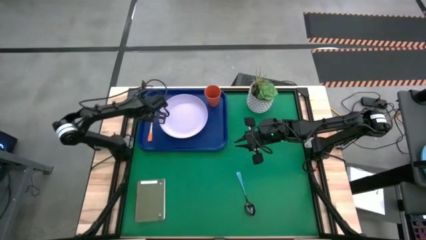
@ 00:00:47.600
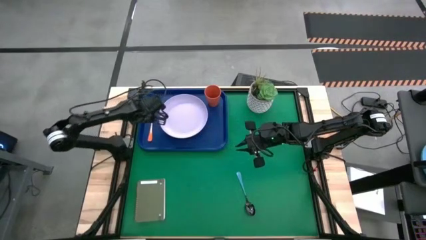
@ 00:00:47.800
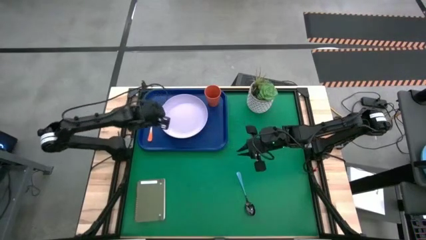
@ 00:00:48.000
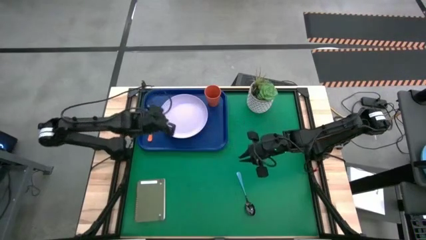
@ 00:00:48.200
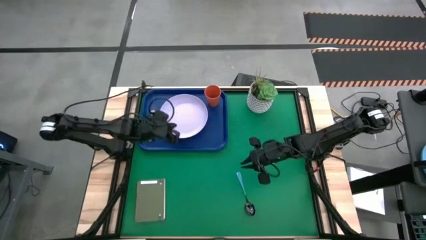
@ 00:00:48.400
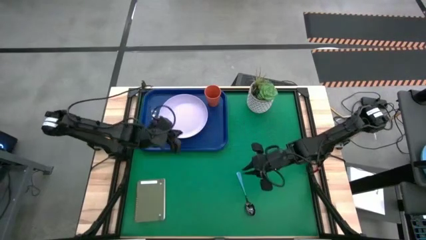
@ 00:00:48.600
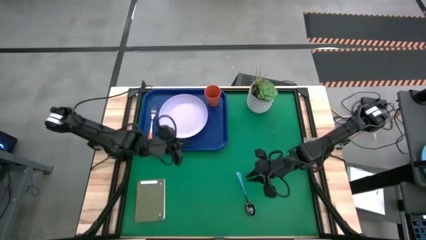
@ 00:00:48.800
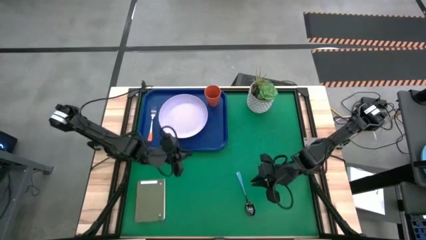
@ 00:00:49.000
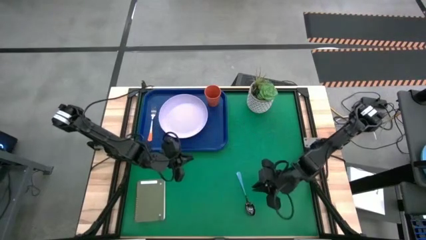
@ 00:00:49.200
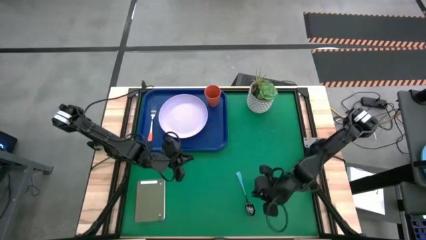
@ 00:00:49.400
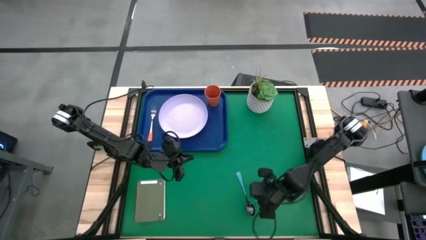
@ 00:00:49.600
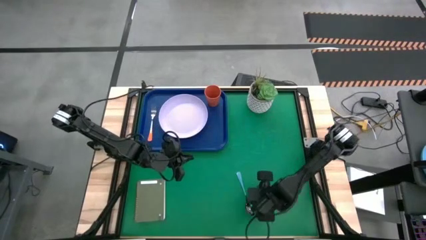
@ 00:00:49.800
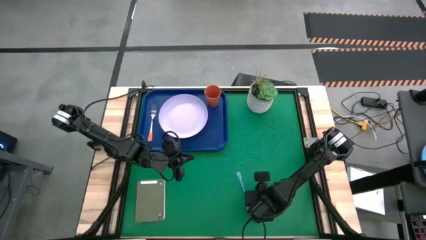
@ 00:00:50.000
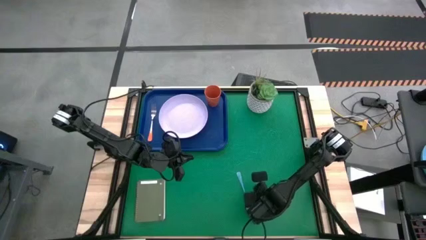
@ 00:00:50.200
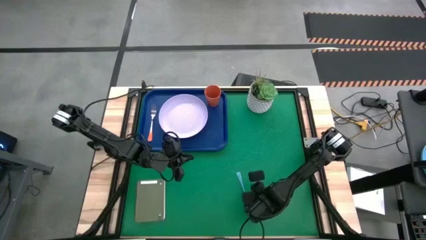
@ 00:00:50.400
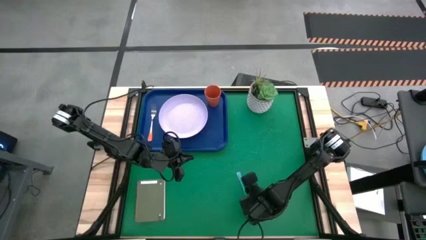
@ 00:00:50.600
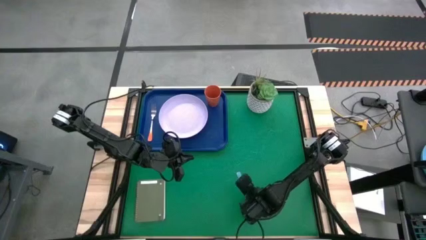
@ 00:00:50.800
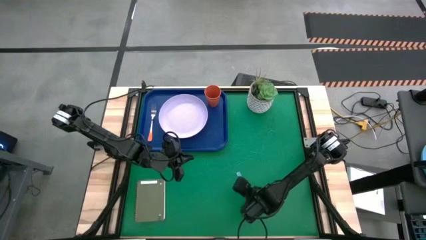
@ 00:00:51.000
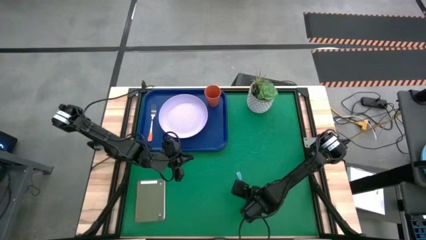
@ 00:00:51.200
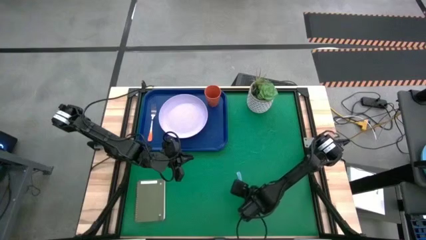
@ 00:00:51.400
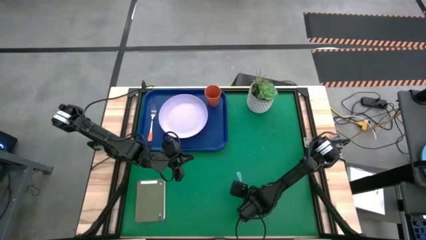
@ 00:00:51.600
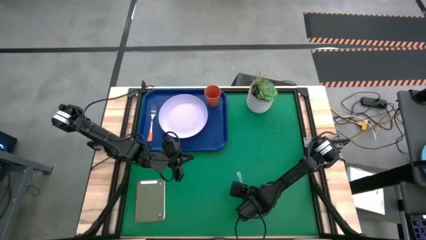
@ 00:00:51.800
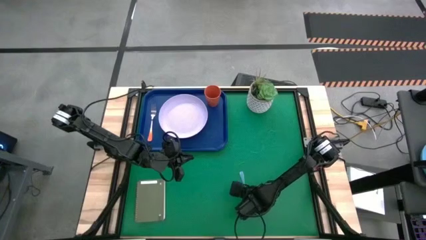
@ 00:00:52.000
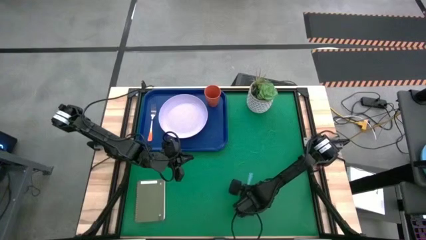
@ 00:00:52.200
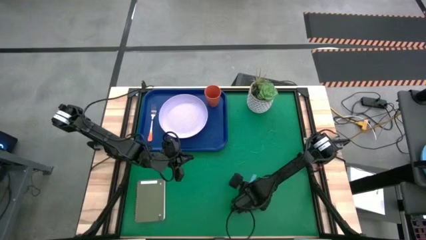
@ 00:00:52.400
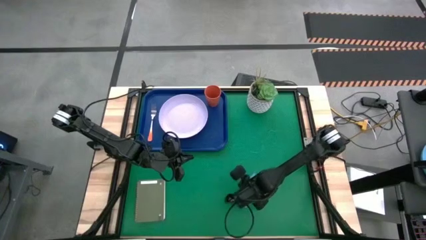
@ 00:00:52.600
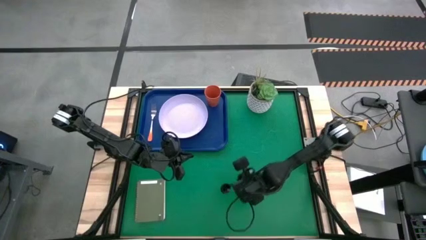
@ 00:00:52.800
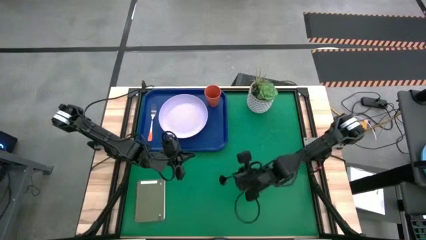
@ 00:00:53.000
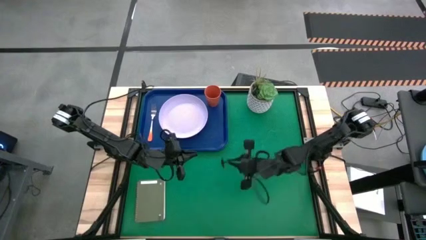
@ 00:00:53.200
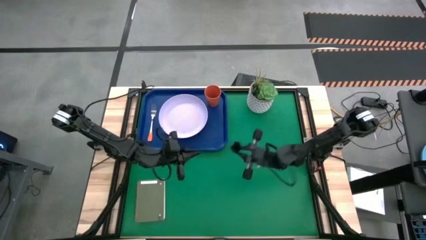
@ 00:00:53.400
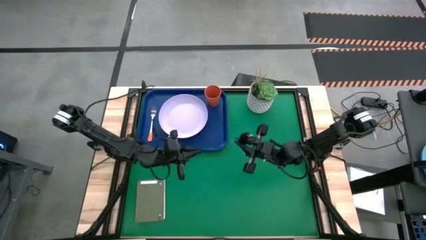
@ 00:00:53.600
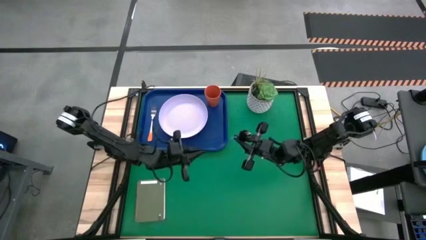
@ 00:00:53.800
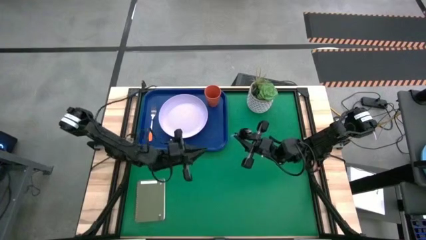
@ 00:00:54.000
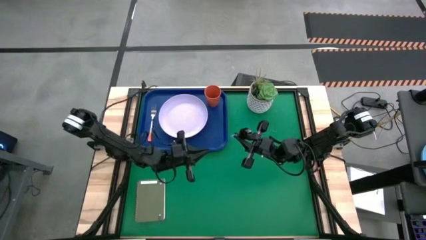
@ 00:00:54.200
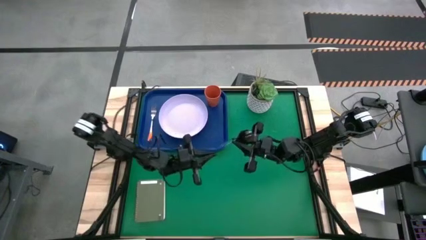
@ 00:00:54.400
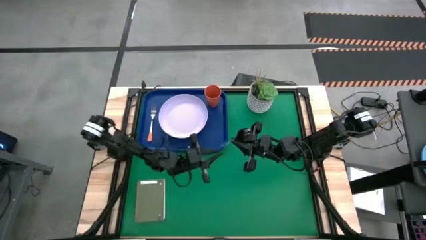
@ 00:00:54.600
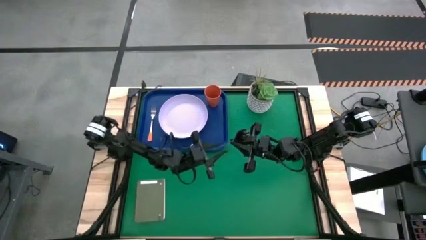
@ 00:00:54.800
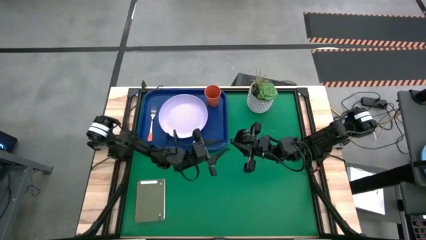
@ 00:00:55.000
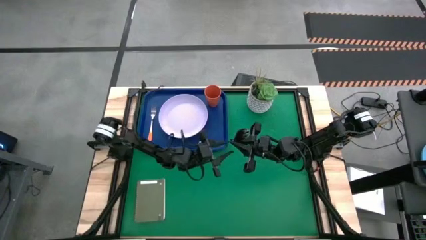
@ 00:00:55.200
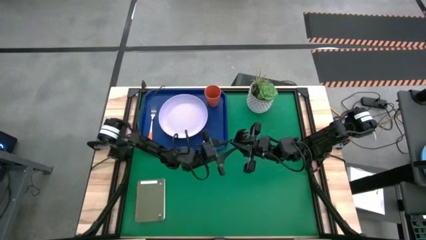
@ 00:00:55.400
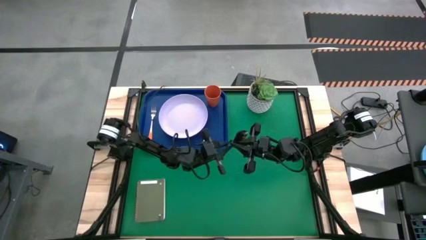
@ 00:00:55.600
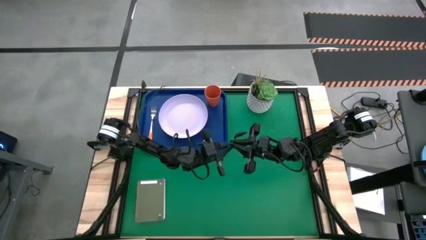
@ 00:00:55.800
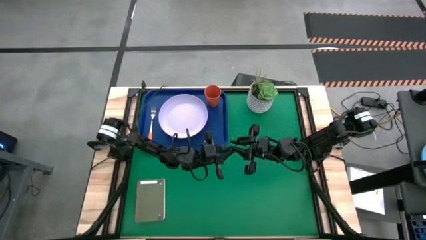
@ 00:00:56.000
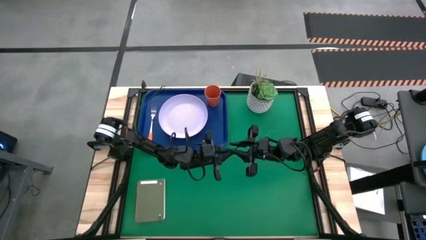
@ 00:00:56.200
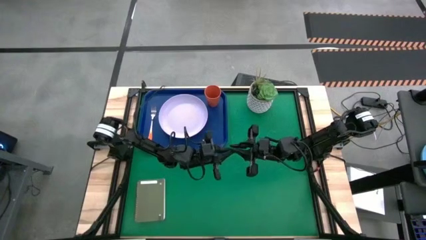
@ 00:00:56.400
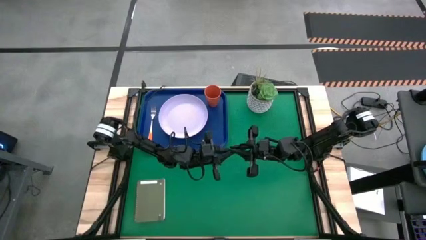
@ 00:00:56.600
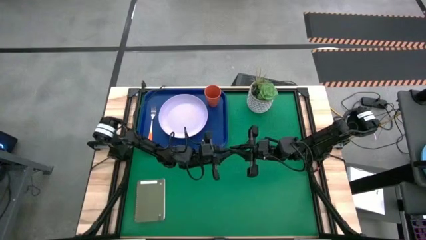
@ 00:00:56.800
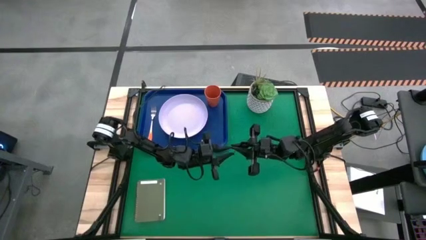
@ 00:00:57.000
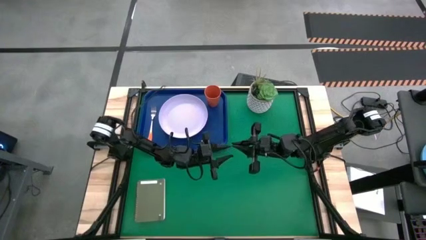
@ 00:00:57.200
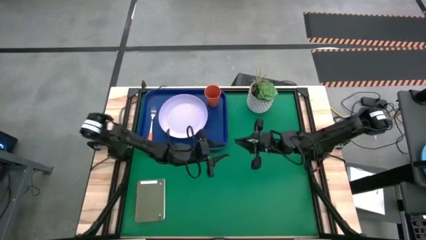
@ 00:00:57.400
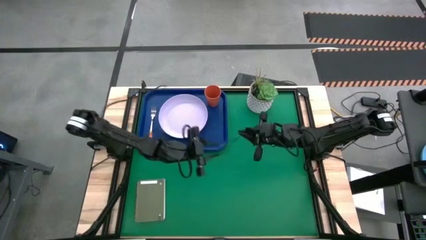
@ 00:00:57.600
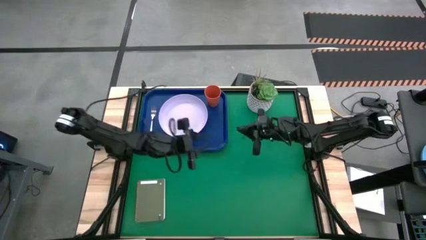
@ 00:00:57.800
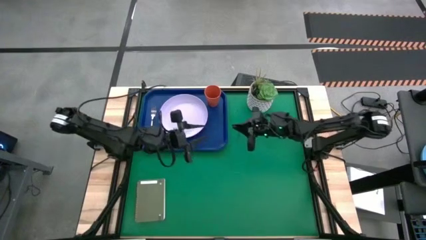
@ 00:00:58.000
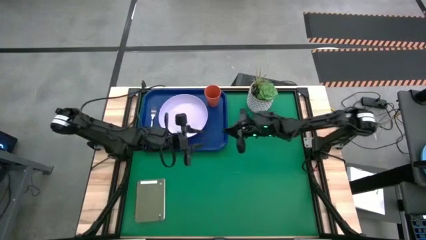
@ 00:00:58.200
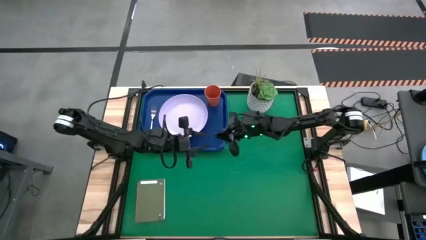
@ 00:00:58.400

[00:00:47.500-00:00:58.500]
Task: Pick and place plate/cup/fork/spoon on tray
Put the blue spoon on the blue tray to the right of the white plate
